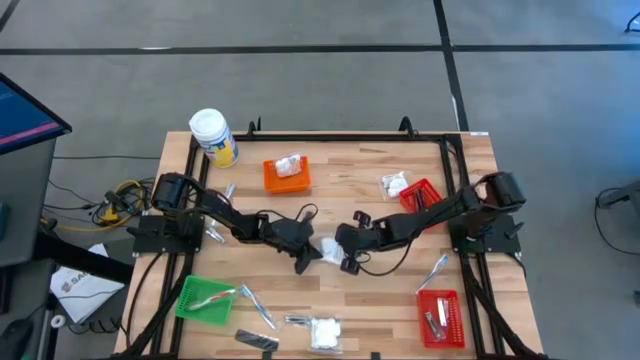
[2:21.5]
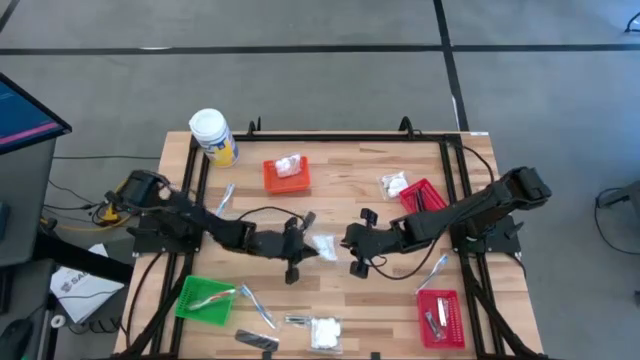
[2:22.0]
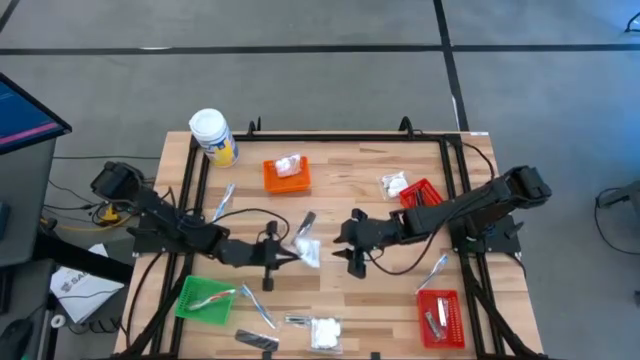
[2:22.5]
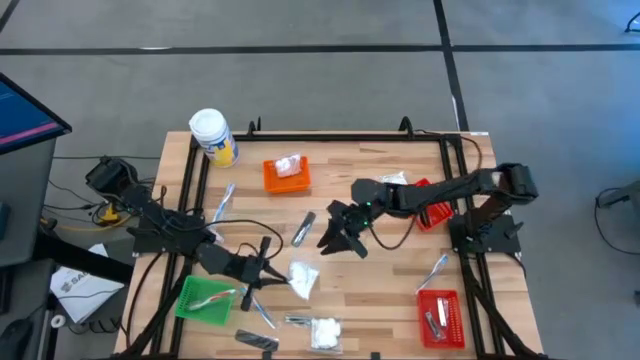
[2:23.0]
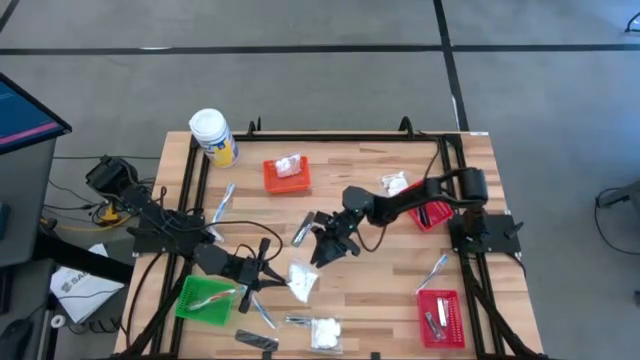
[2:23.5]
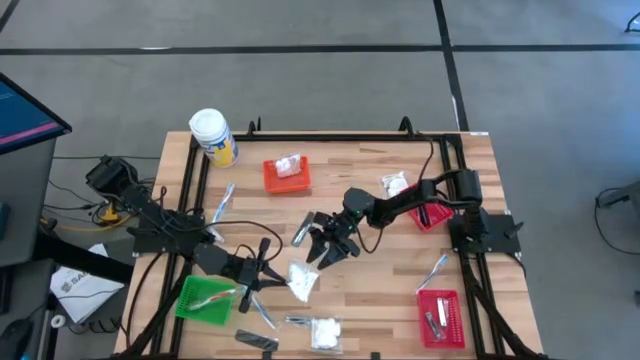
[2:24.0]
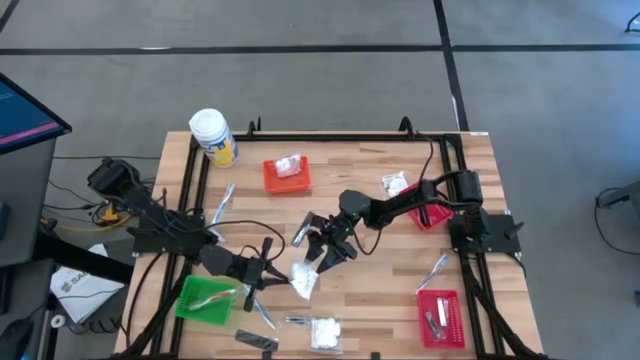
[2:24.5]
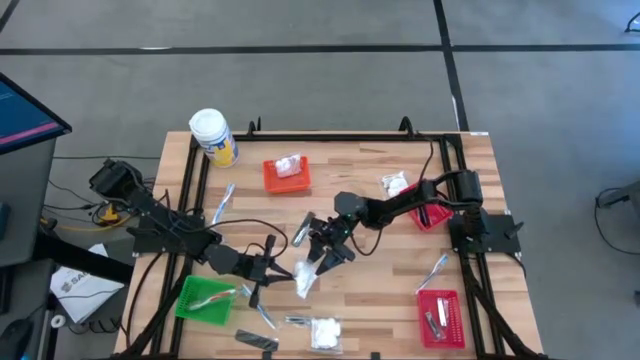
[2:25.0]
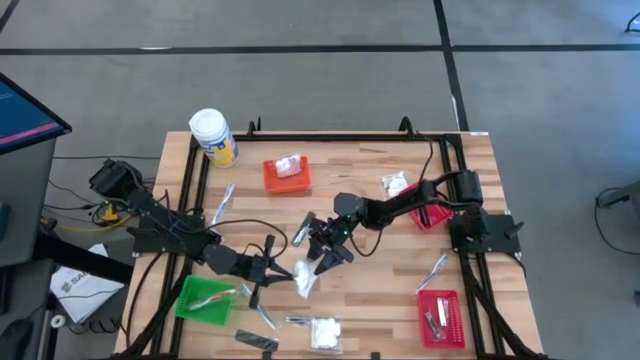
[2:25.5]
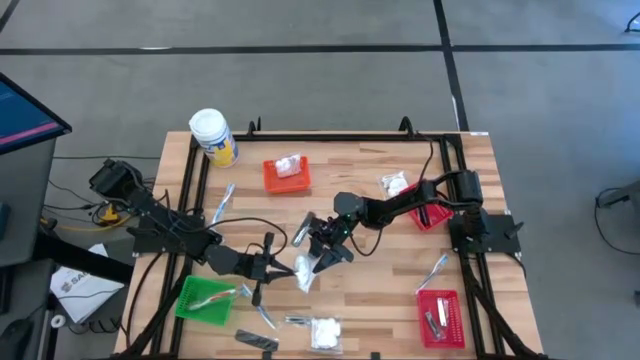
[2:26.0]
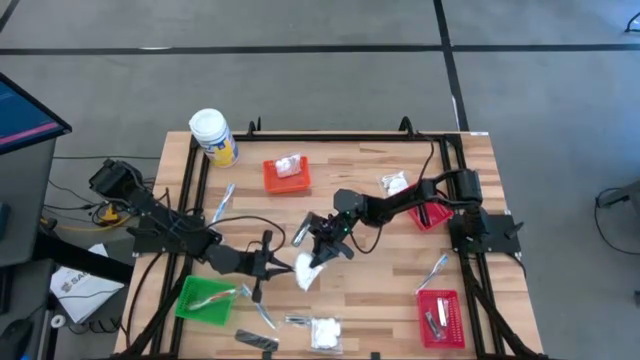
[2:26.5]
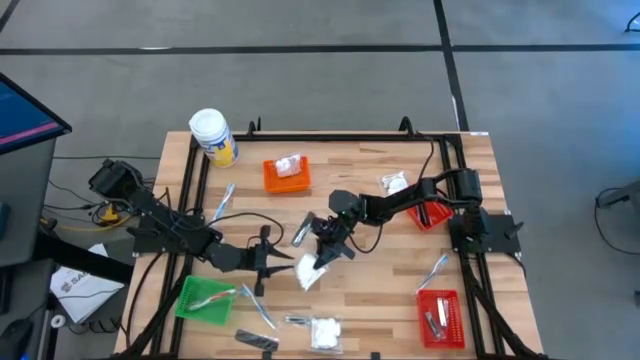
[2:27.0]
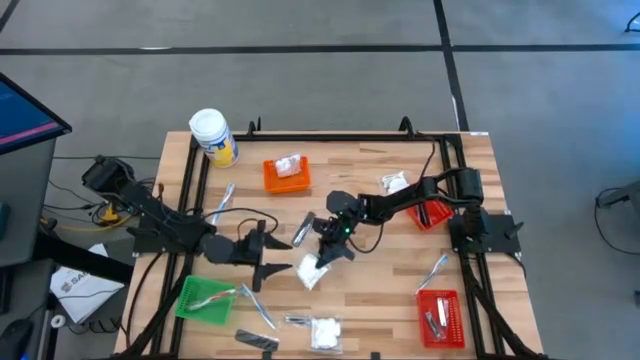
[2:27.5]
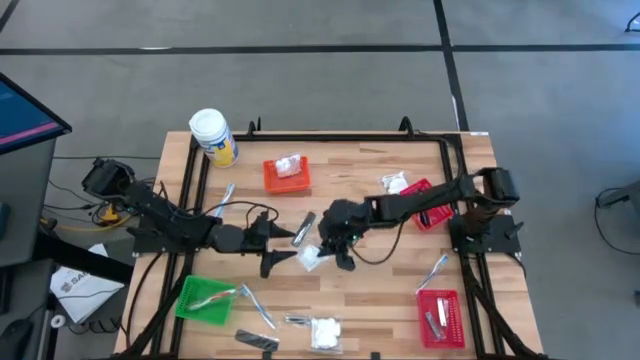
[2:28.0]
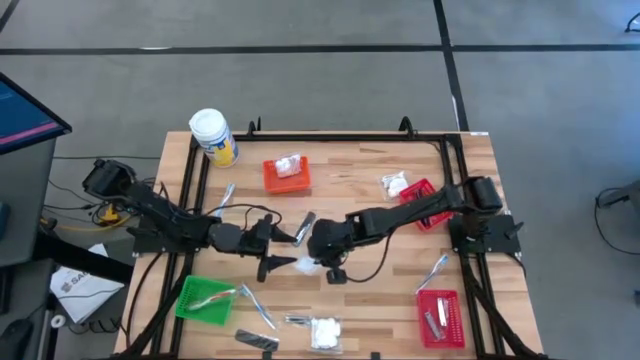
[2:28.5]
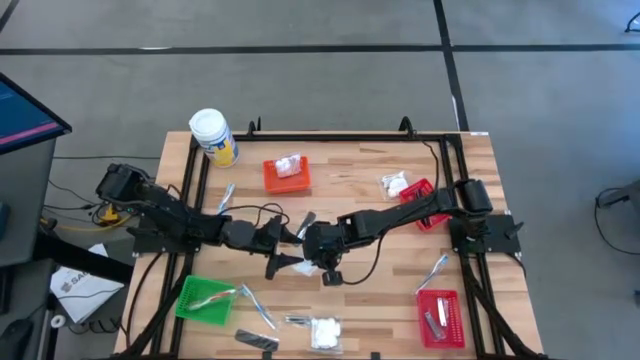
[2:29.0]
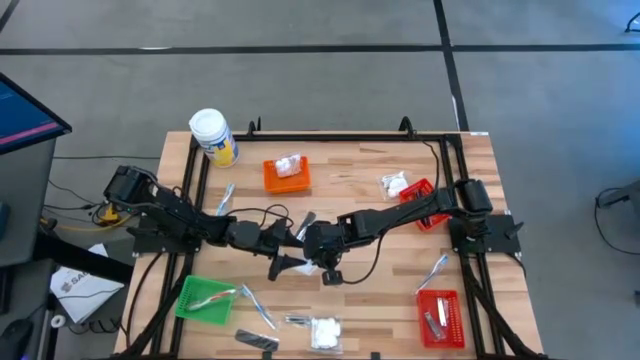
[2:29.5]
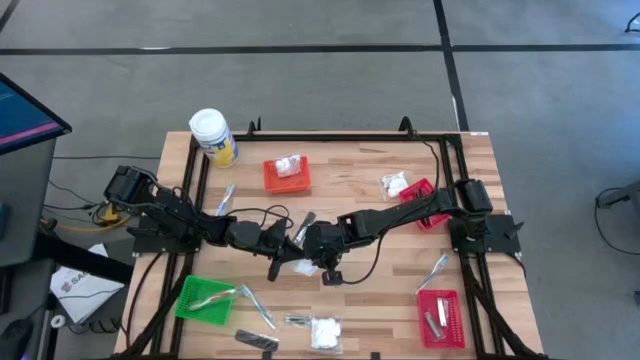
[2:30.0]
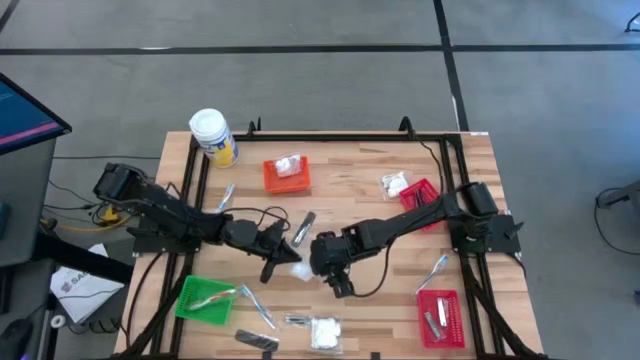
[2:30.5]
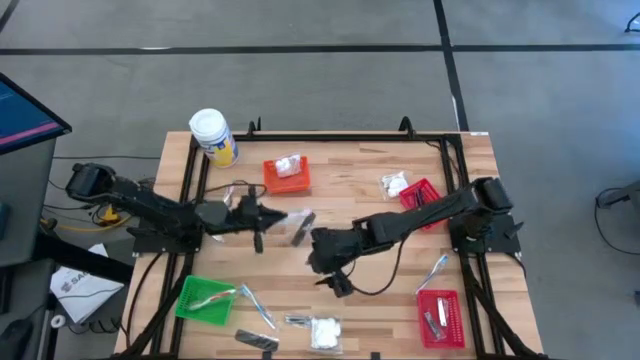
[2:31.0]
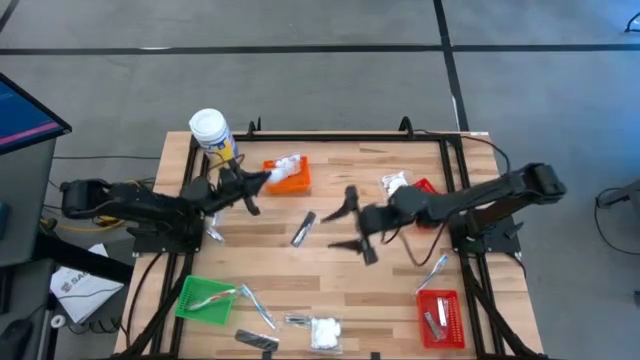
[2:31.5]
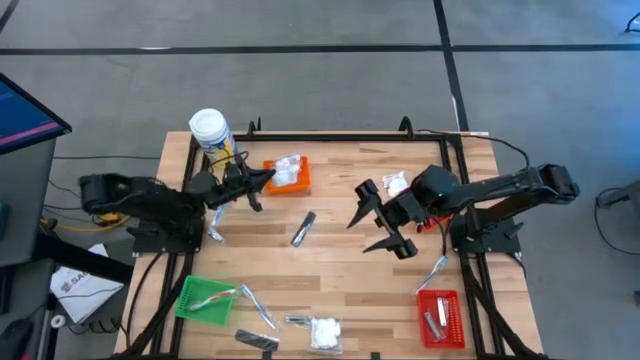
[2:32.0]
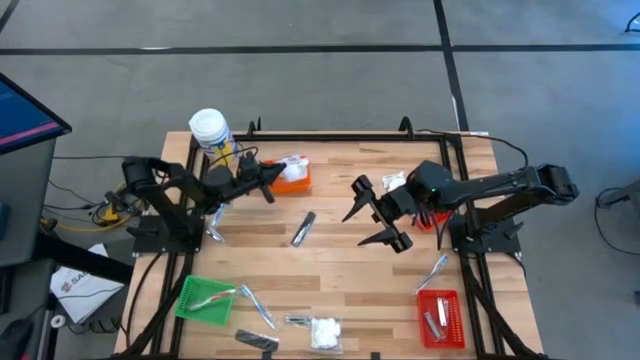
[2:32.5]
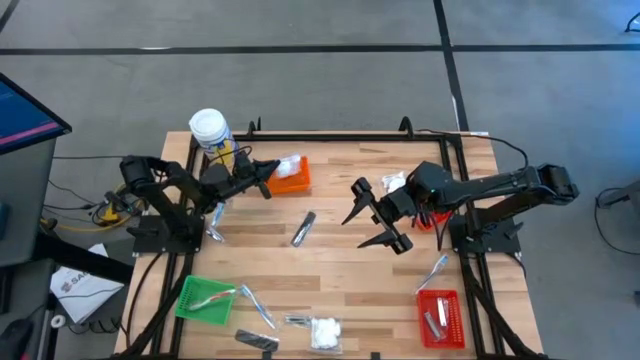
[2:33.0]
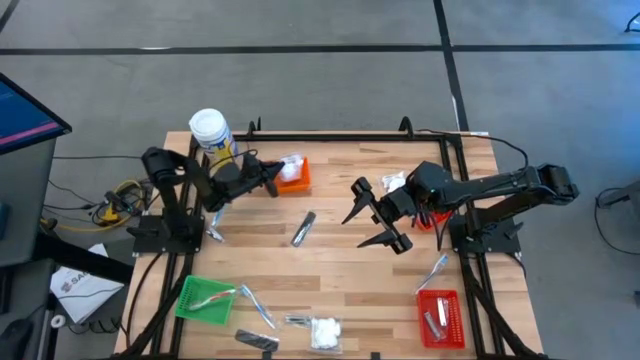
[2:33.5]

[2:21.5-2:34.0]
Task: Pick & Place Travel size toiletries
Put the white cotton pack into the orange basket

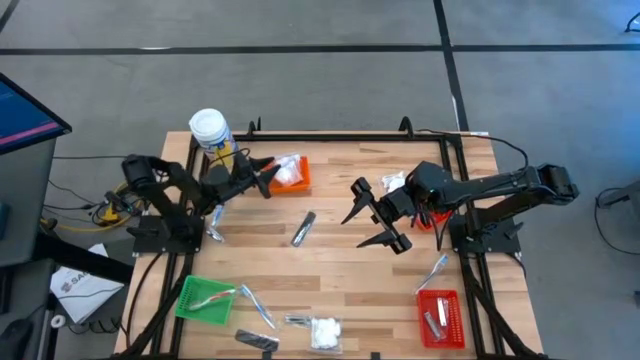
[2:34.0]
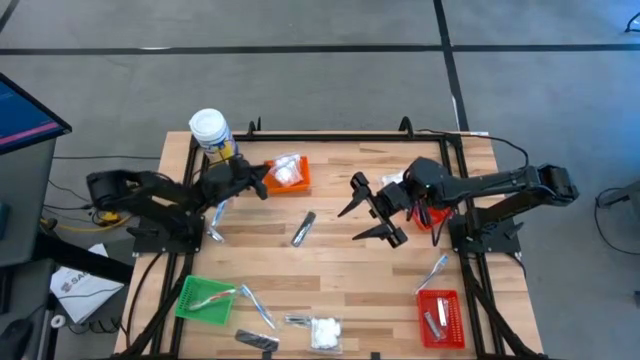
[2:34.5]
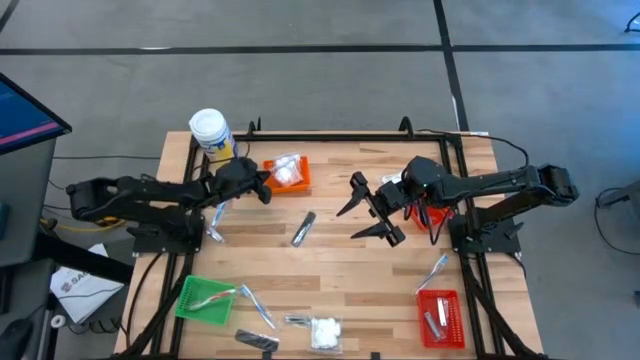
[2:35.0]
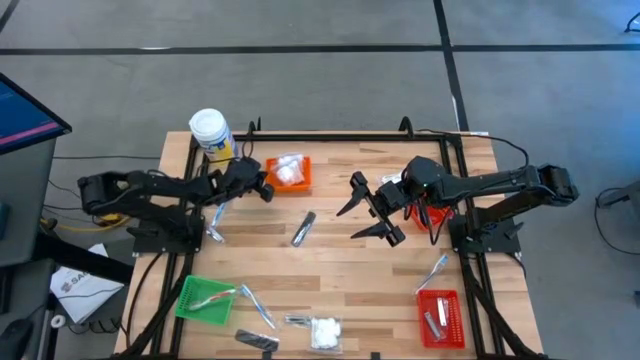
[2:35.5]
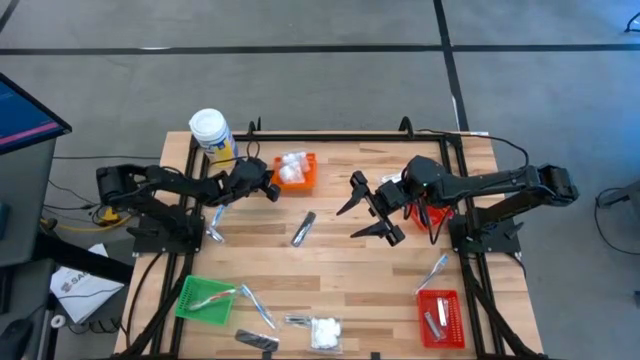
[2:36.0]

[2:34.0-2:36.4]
Adjust the orange basket

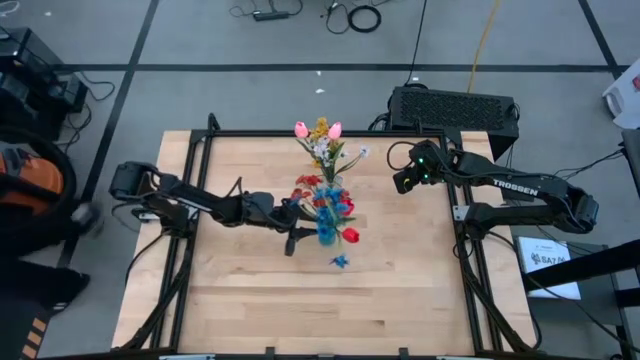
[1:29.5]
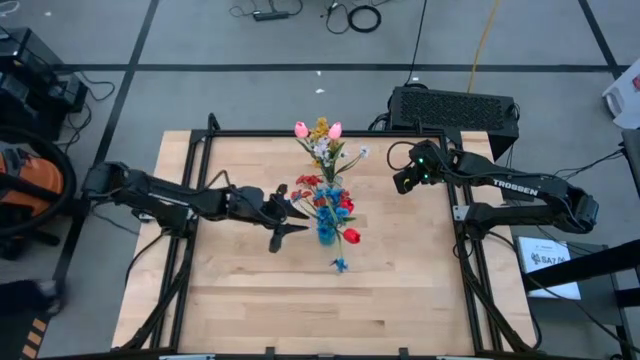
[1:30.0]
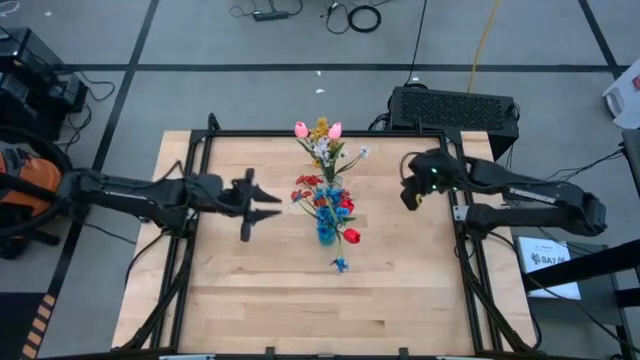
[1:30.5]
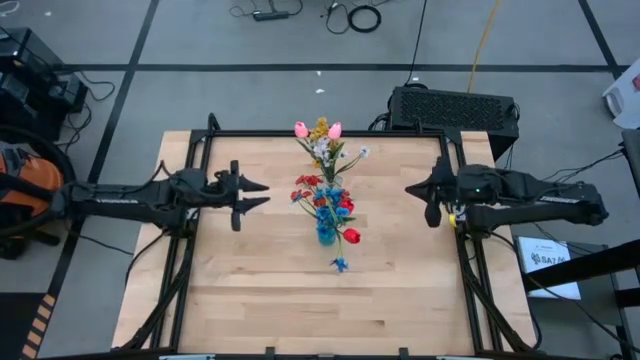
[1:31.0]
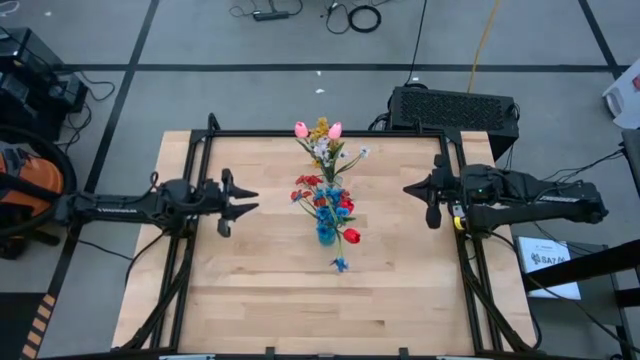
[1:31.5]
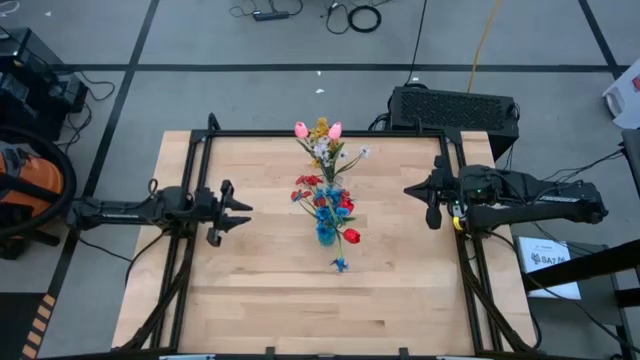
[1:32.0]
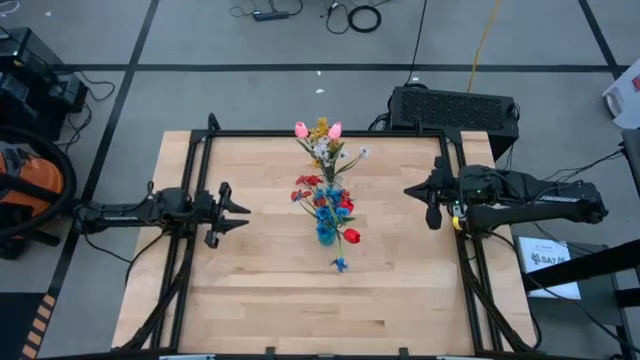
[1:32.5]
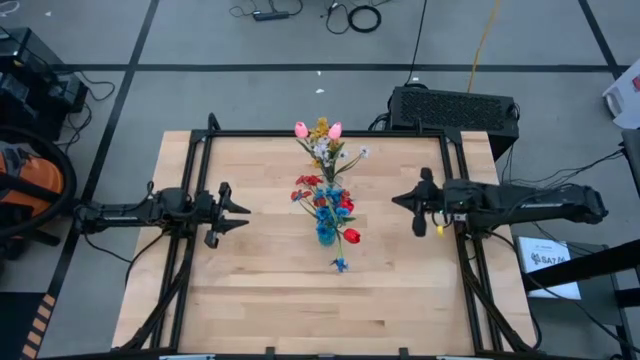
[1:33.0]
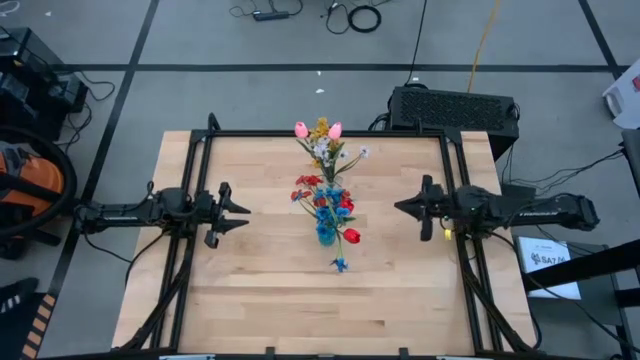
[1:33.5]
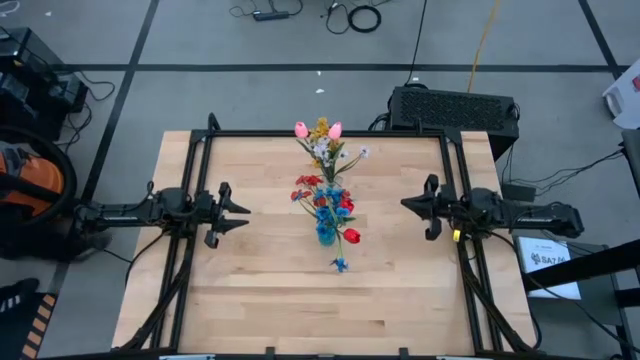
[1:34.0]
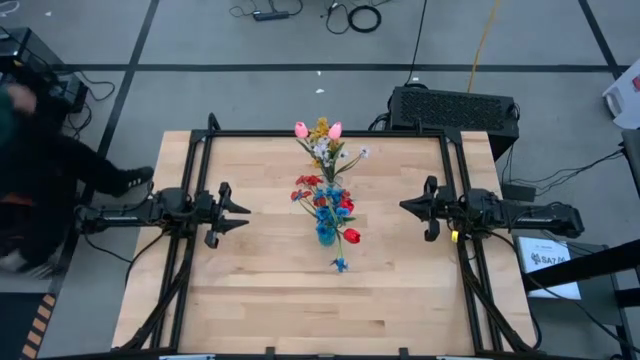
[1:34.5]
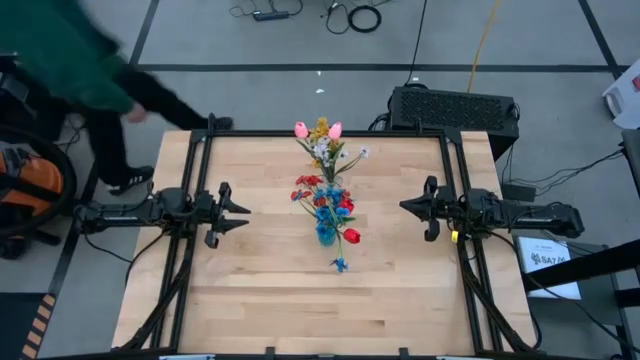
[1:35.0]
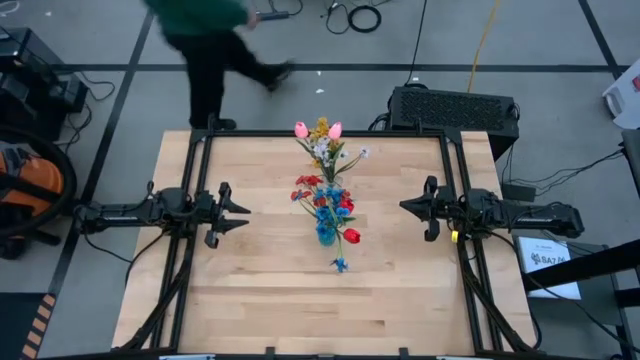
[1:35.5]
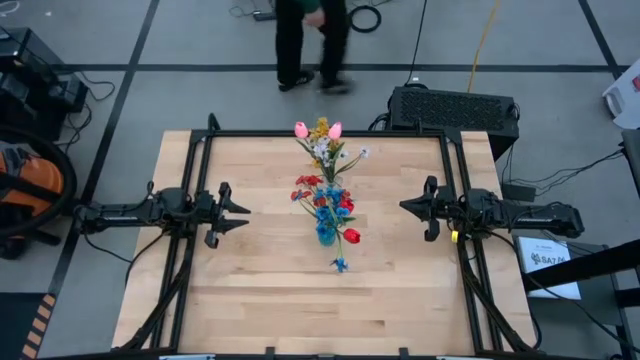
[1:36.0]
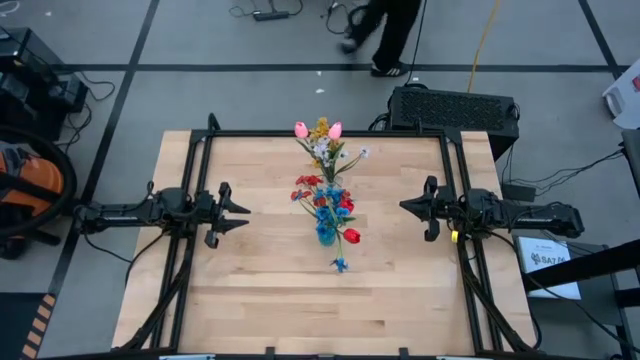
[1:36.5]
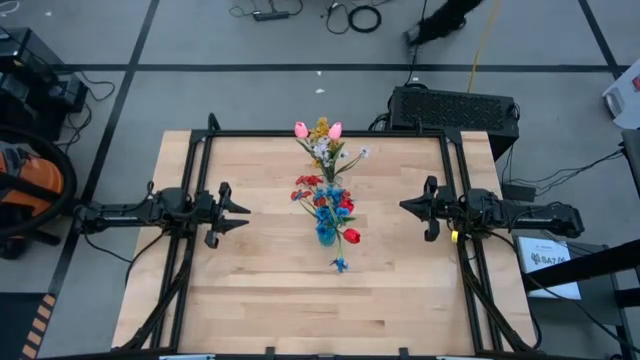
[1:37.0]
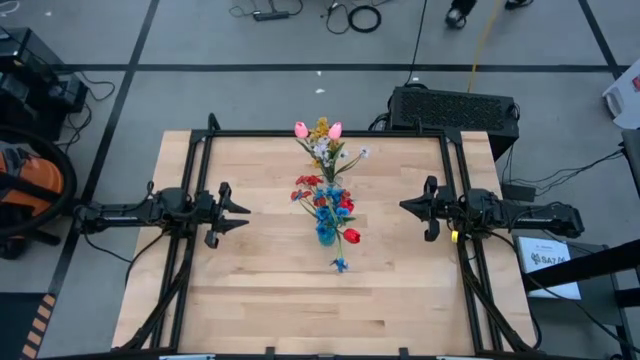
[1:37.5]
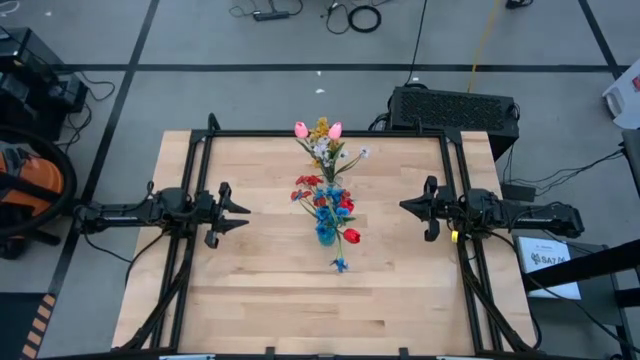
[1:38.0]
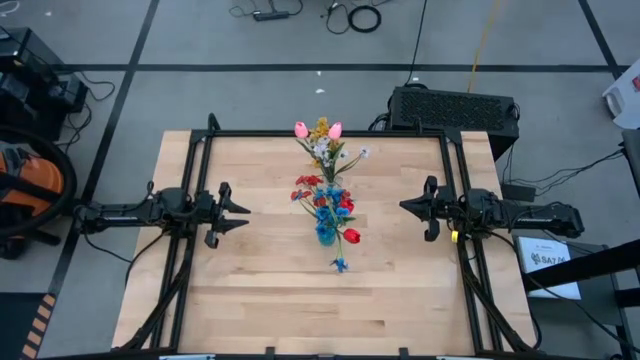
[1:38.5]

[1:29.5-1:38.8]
Task: Sort flowers into vase by color
Return to Home Position
